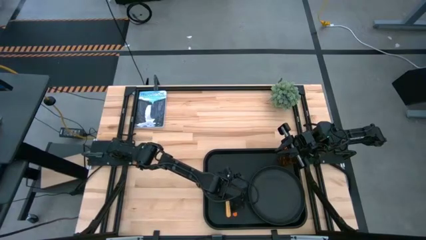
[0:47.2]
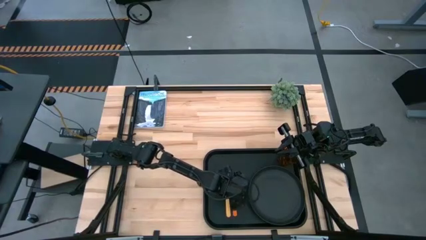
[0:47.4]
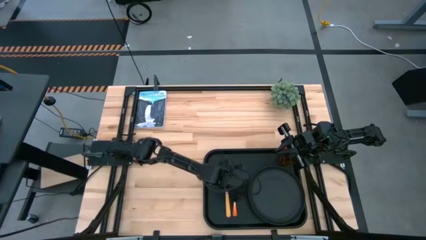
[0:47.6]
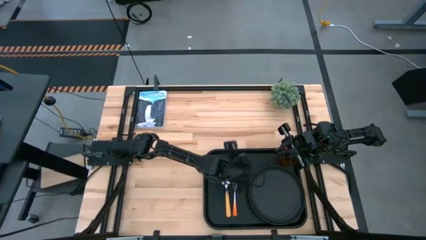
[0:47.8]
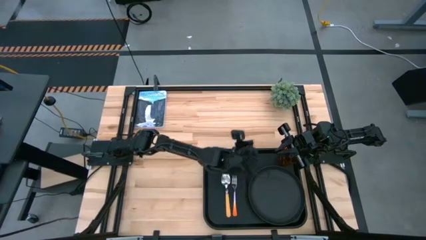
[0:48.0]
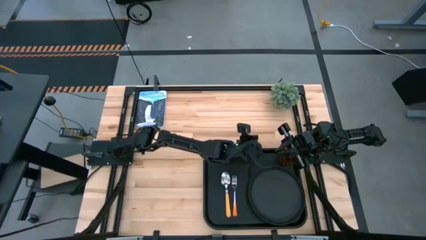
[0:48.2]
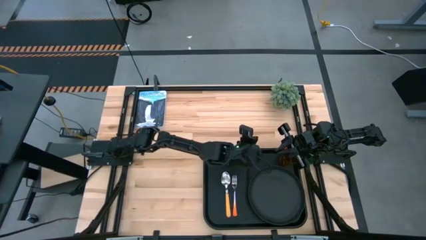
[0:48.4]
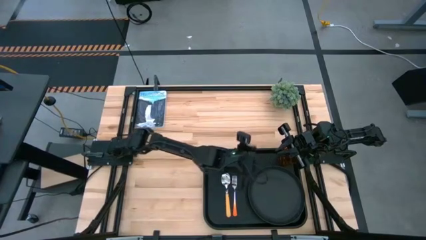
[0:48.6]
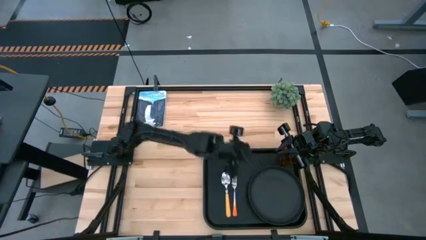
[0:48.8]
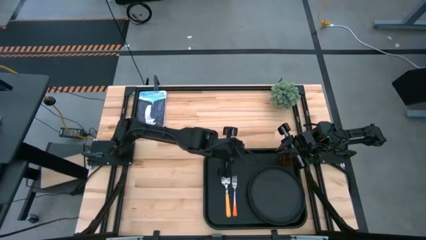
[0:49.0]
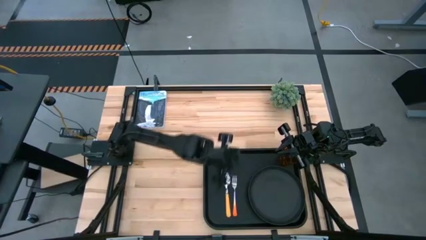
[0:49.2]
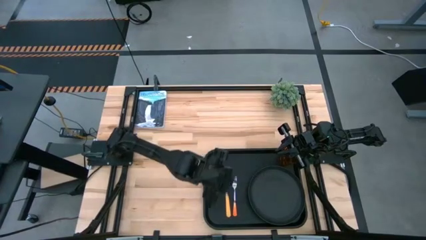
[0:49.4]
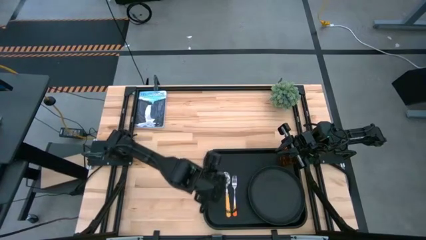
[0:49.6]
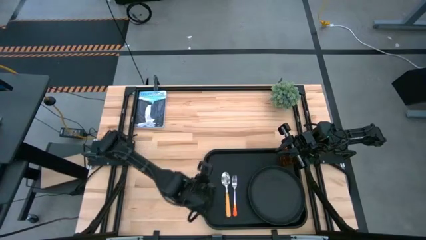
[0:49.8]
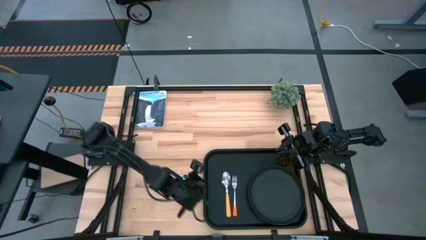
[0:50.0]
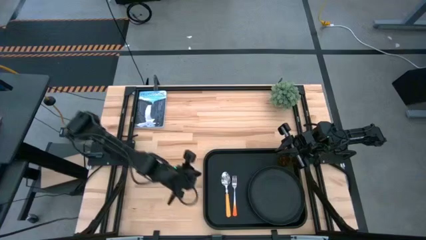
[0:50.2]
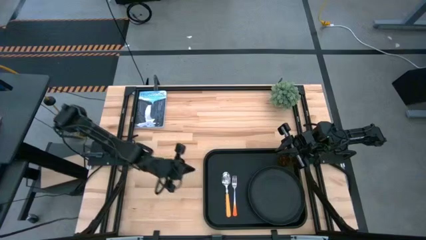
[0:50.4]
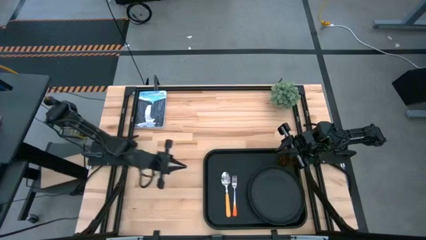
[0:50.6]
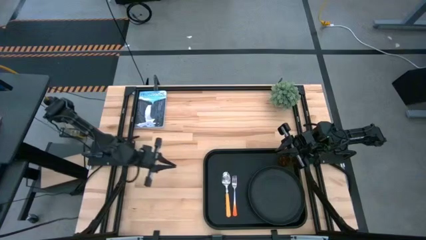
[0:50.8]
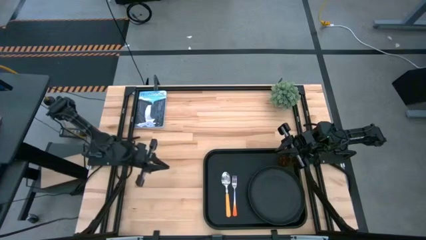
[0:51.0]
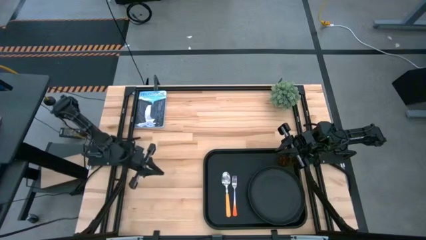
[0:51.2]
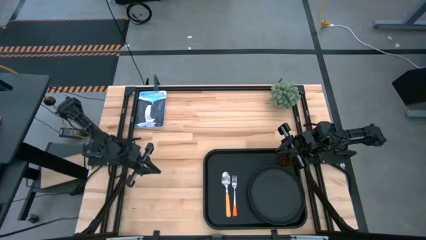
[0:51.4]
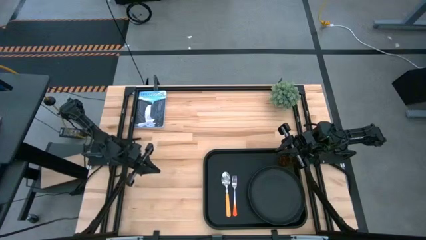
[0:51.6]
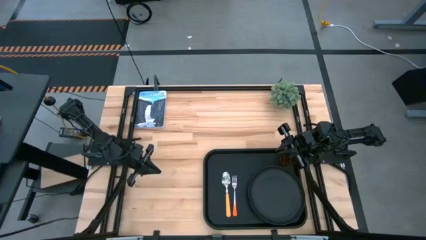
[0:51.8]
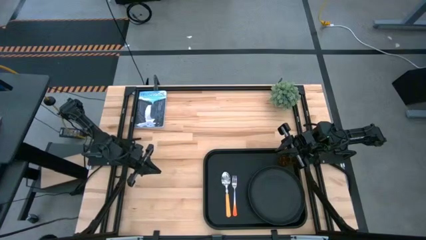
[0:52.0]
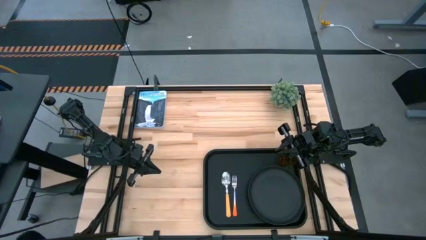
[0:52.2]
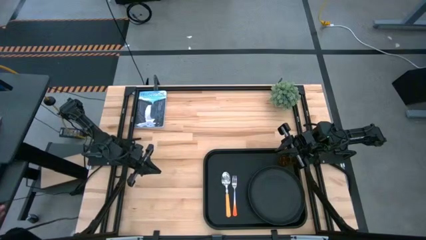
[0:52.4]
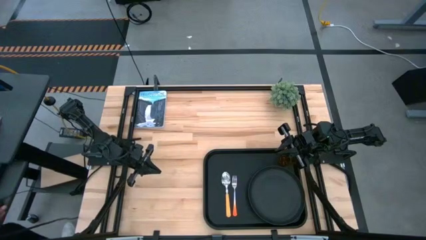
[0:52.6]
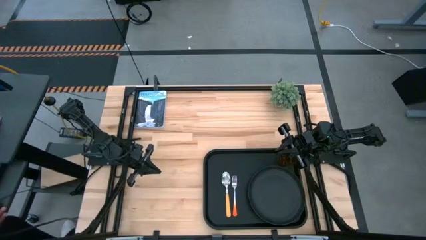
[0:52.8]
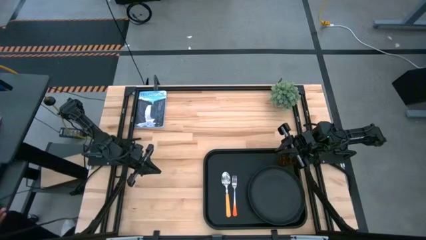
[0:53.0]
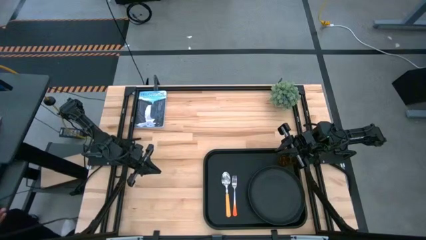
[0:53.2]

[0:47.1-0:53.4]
Task: Pick and place plate/cup/fork/spoon on tray
Return to Home Position

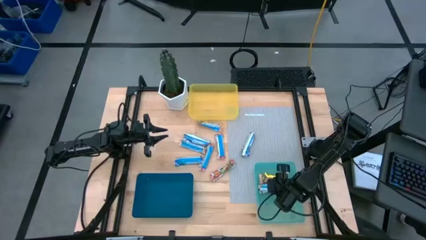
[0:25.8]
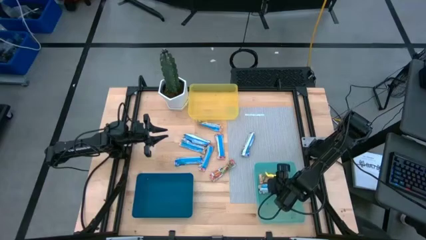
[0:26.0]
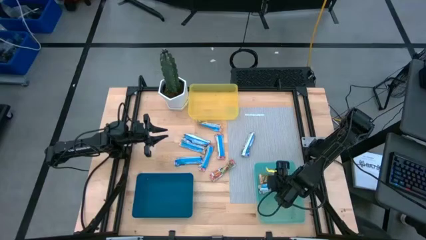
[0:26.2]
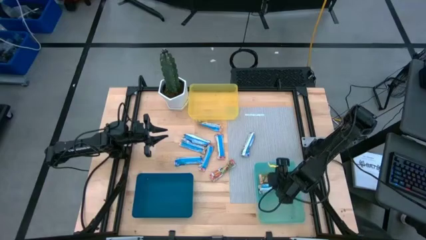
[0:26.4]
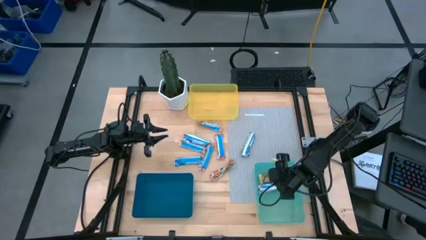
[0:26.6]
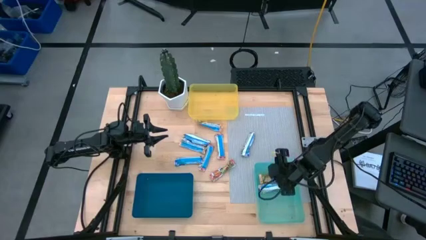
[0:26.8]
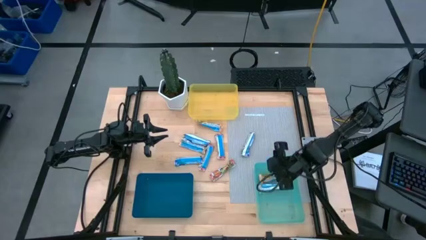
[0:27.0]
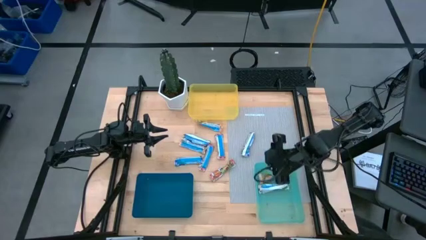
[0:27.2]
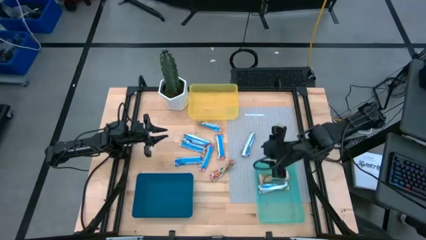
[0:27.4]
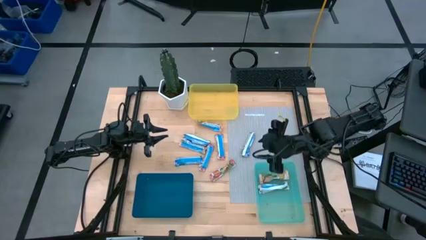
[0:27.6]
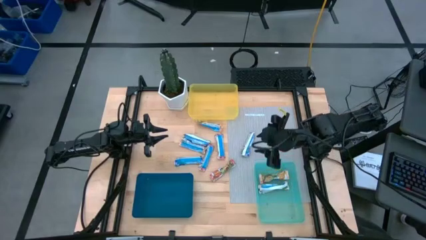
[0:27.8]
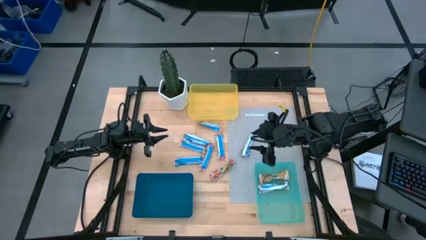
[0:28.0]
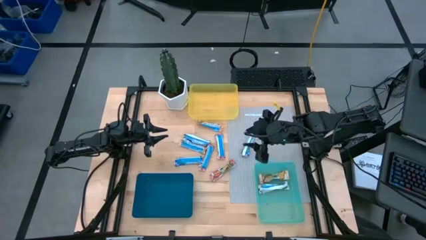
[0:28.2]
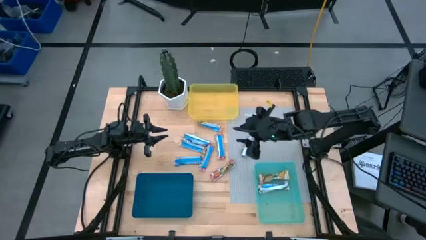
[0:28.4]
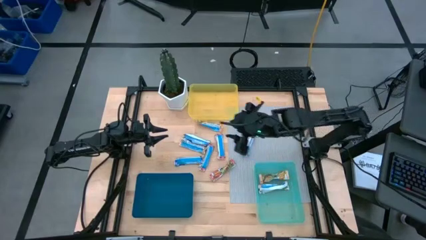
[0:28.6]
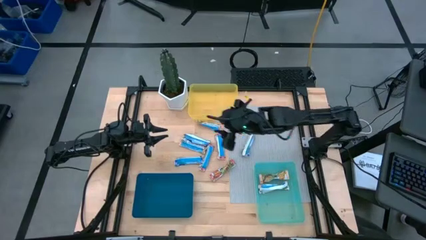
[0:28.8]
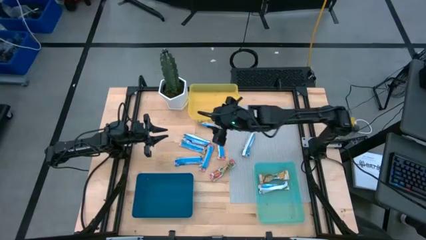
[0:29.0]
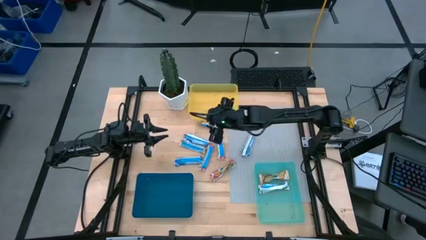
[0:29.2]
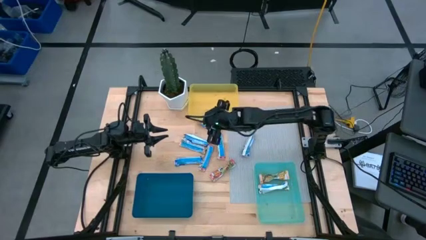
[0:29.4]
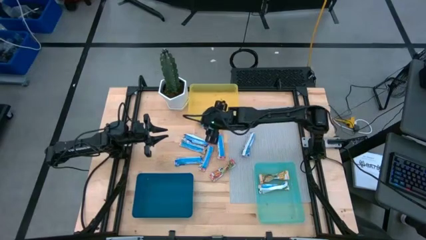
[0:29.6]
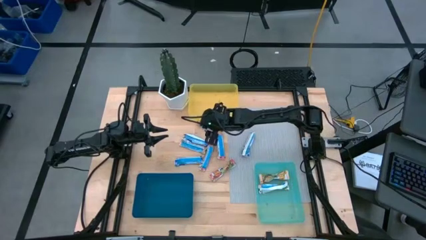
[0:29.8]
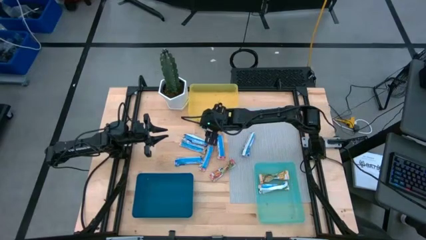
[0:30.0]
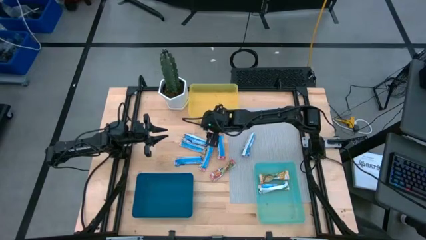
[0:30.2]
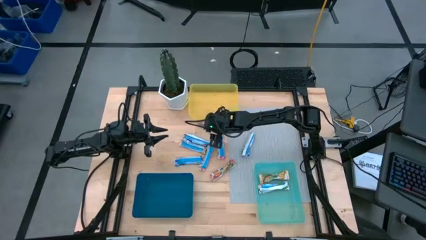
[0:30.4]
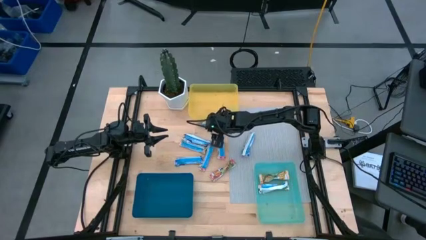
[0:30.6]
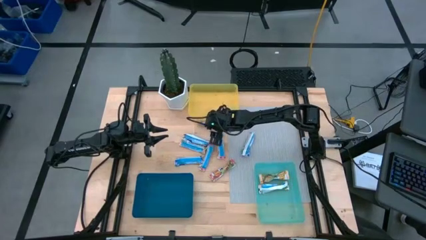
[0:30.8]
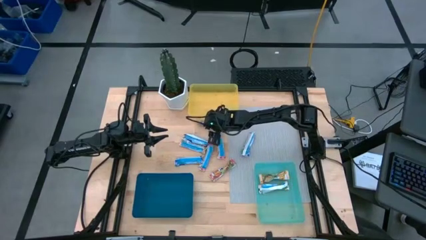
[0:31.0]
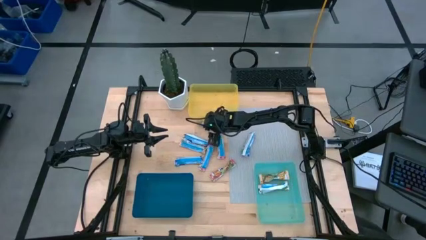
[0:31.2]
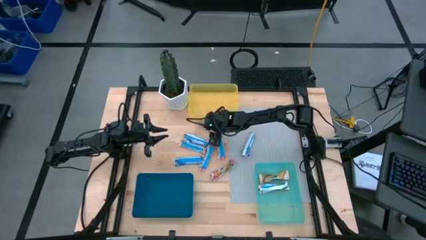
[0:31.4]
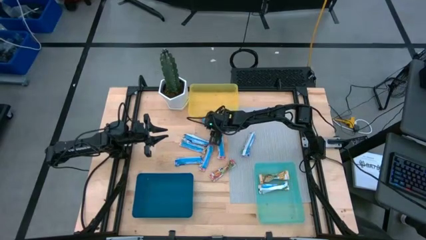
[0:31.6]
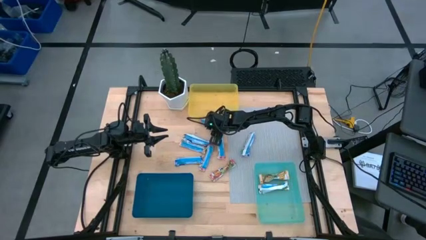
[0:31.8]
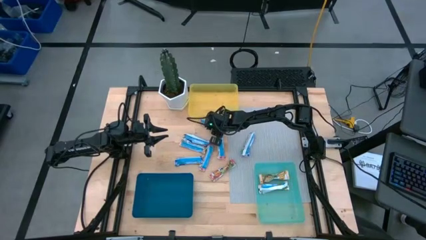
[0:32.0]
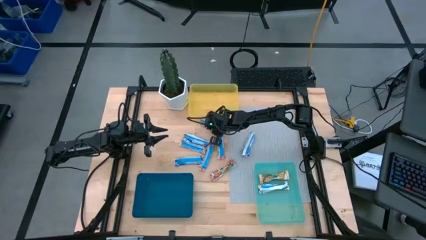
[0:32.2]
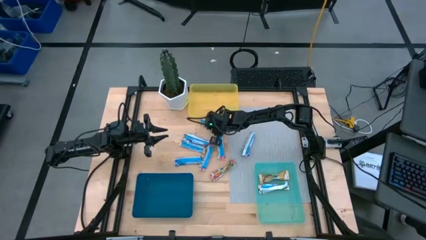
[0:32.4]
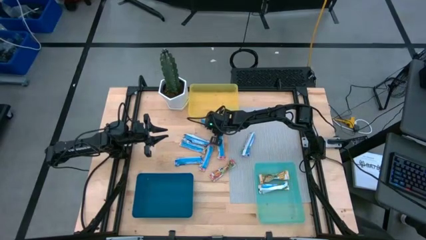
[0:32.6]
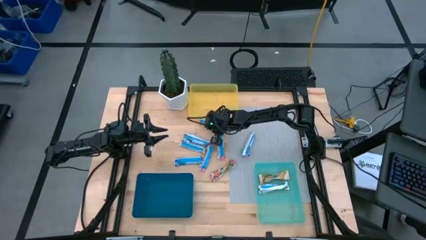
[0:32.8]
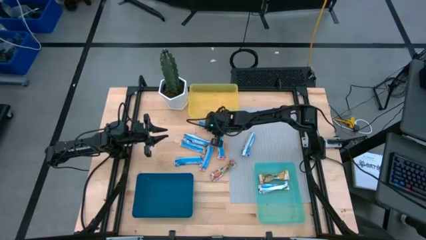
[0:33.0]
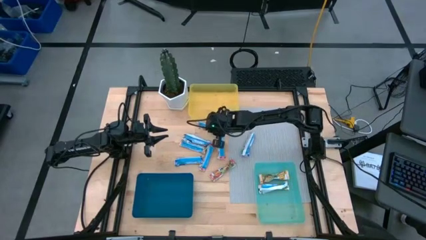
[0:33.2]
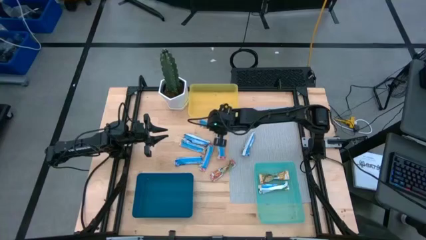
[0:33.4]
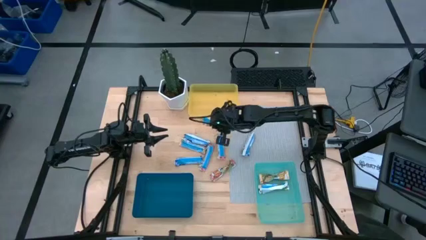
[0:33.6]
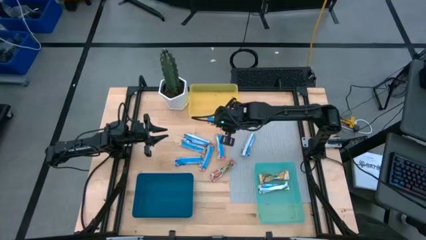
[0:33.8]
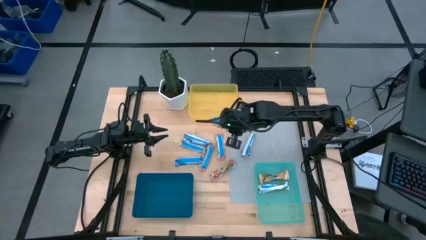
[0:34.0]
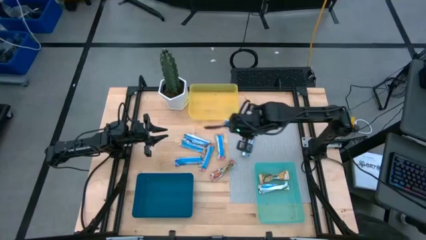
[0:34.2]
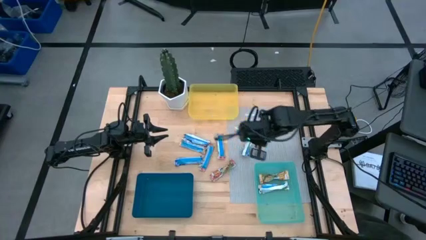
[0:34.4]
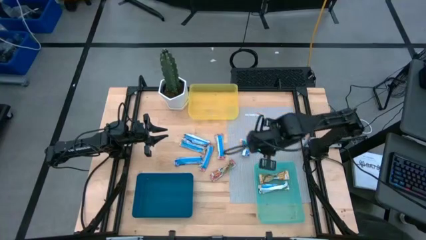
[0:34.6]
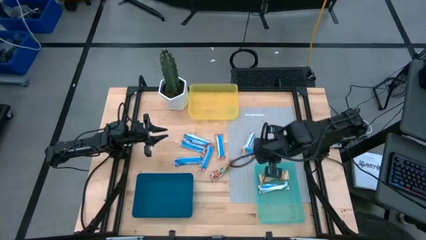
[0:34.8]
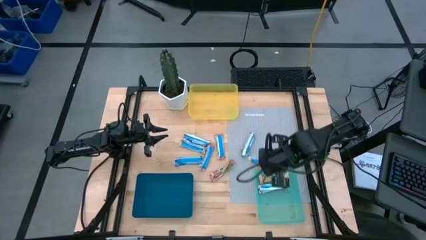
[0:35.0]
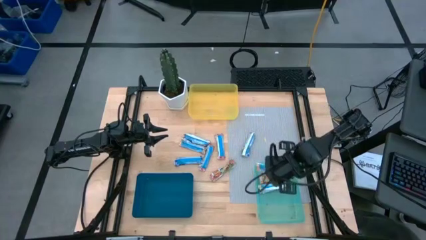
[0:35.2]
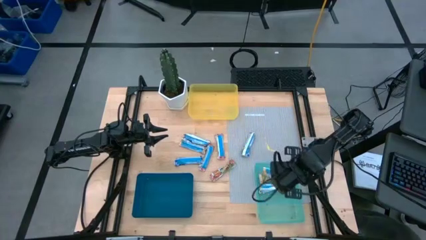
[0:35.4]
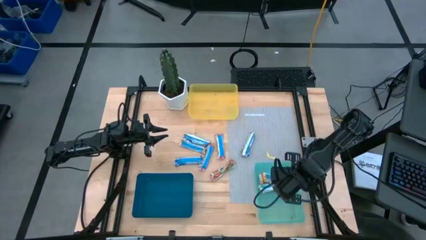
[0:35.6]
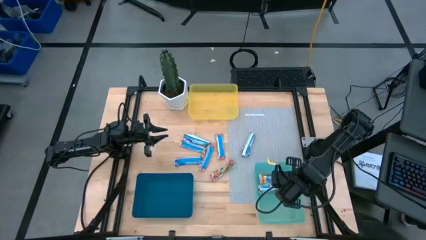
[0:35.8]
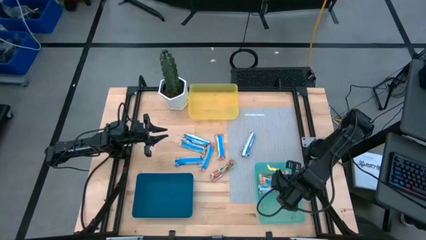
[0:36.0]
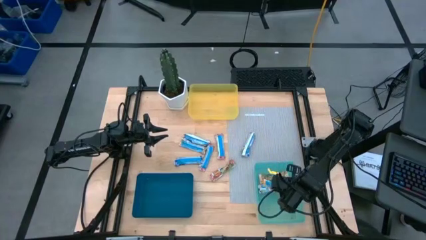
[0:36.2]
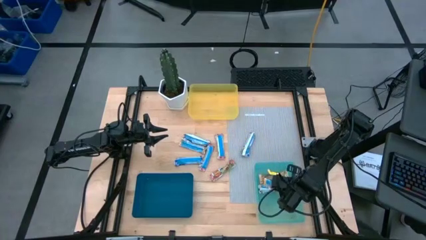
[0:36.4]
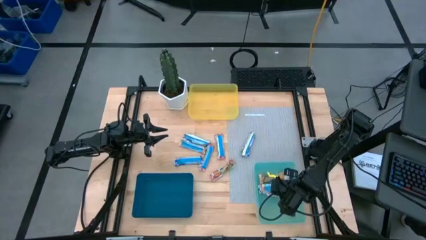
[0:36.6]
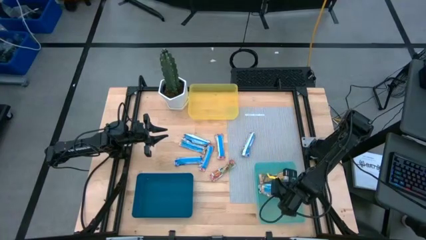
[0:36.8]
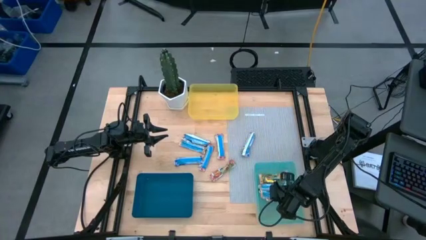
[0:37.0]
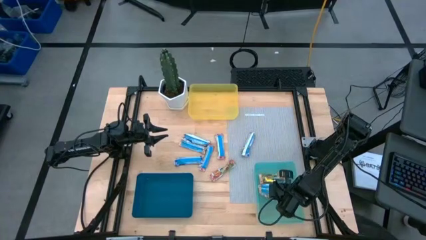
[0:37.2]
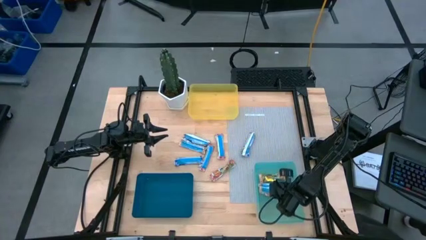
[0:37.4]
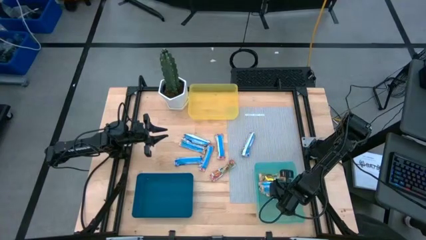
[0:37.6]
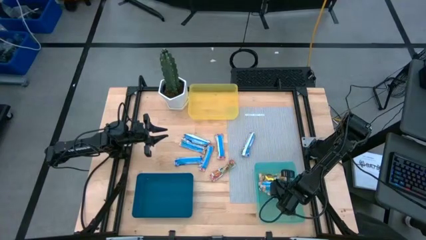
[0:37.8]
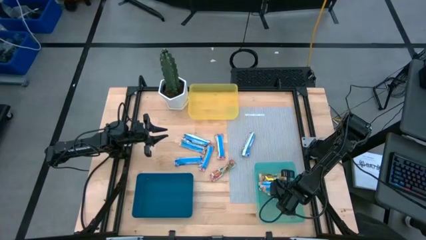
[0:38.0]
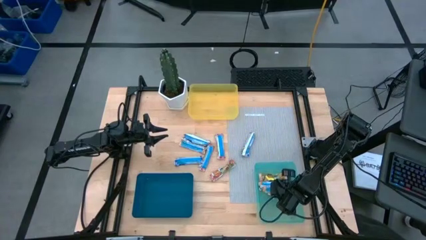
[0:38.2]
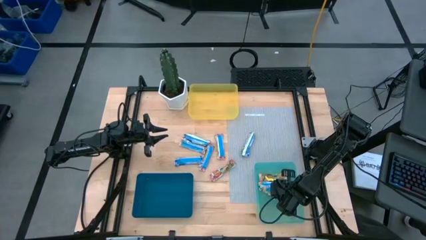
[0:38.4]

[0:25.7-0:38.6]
Task: Pick and place Granola Bars by type
Put the yellow granola bar into the green bin
